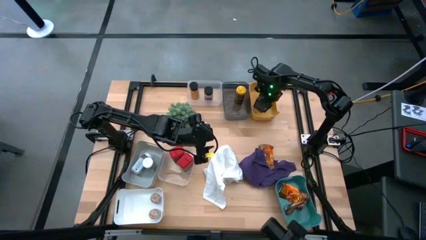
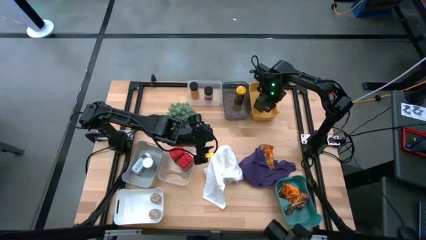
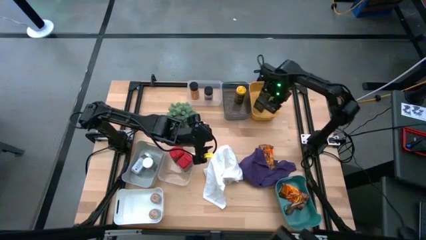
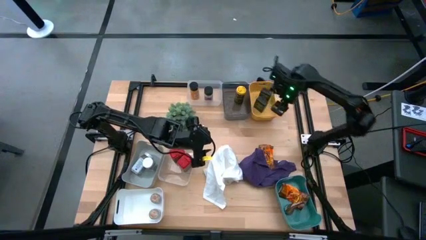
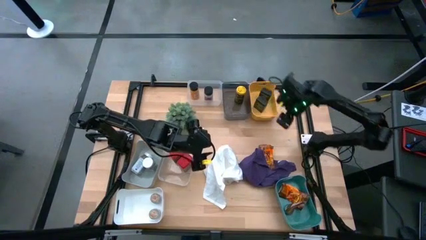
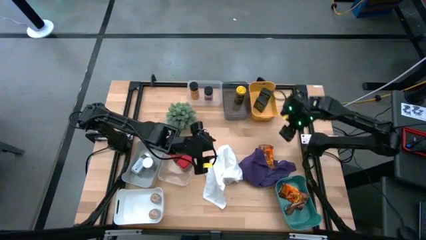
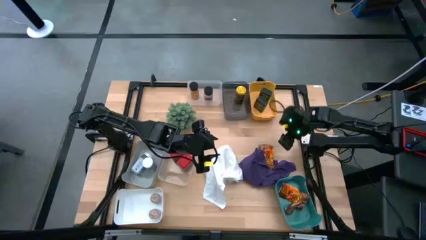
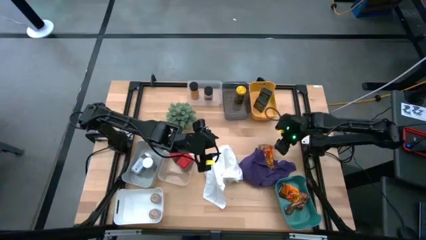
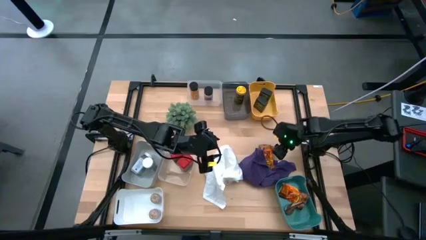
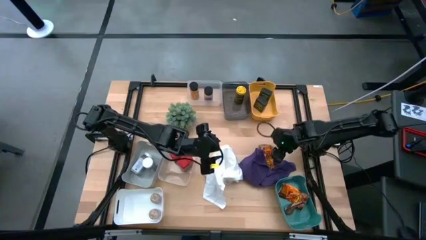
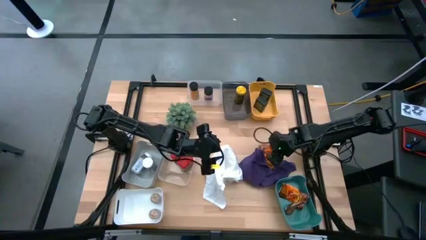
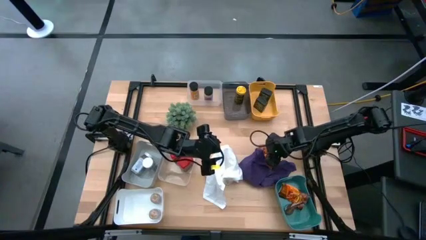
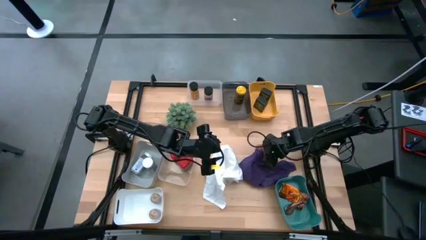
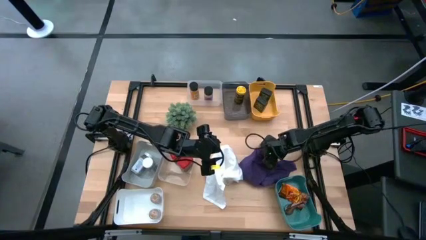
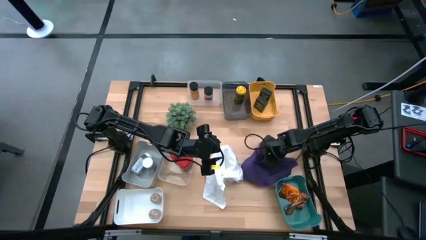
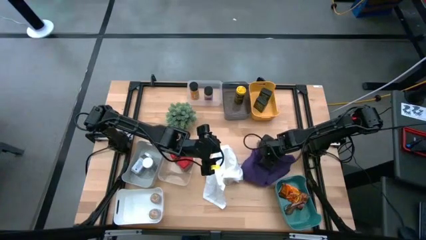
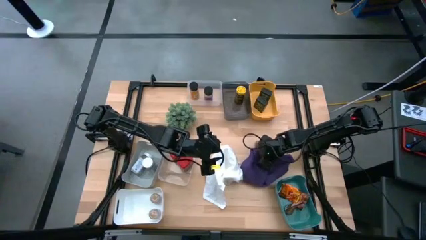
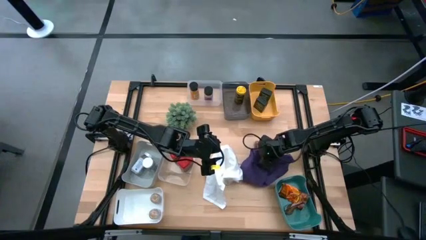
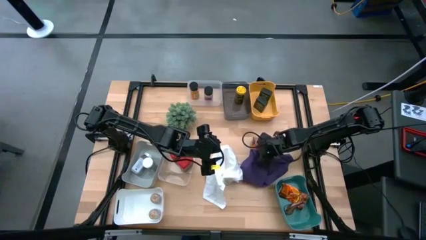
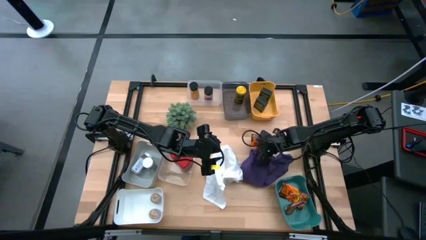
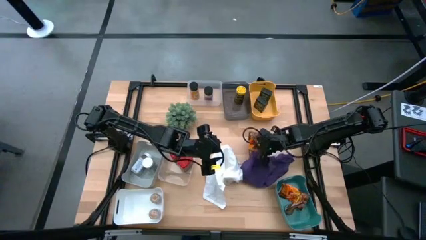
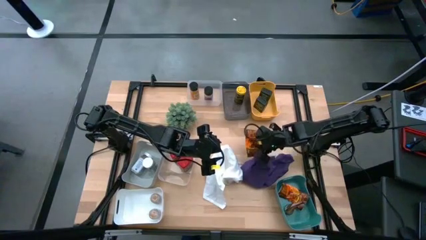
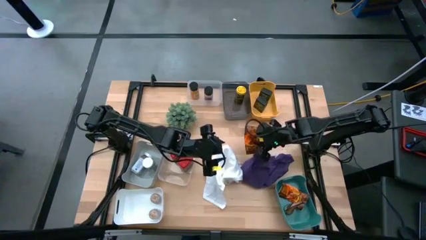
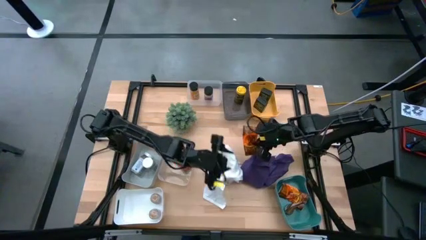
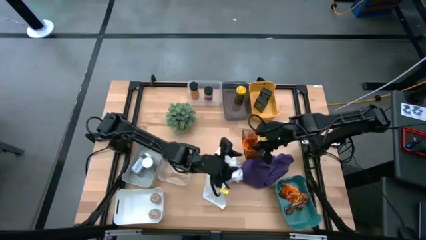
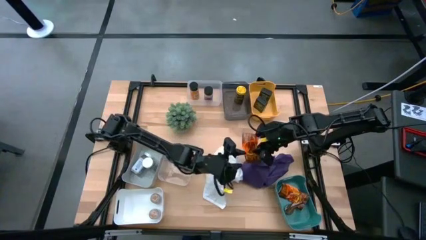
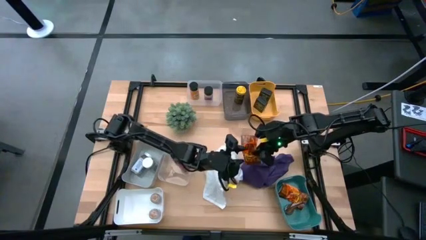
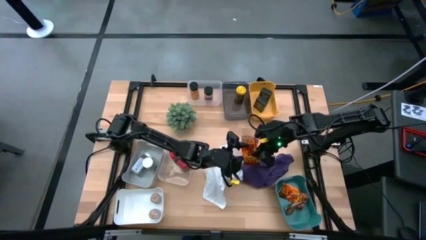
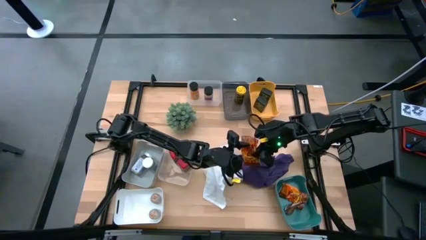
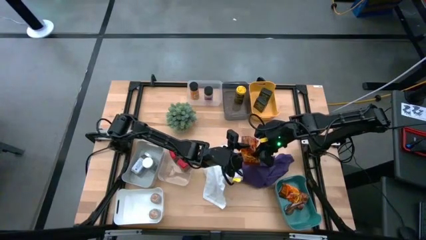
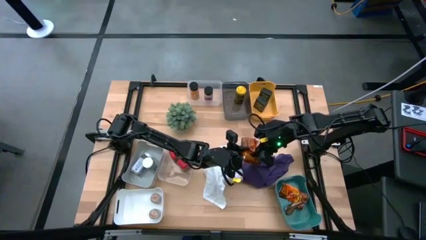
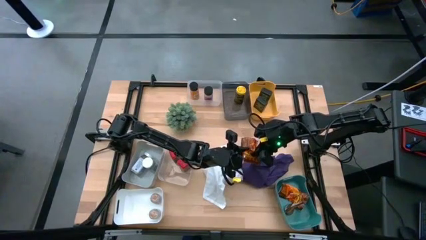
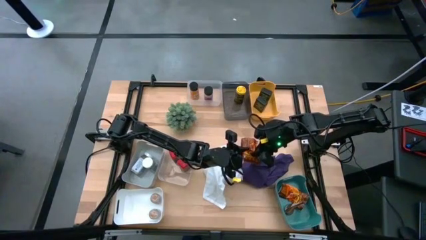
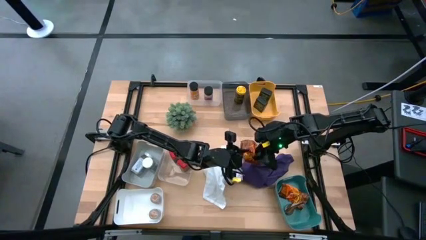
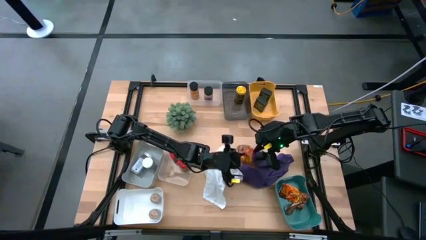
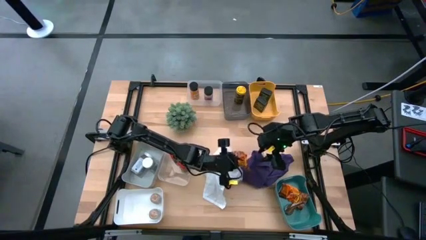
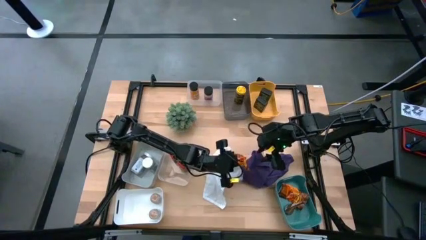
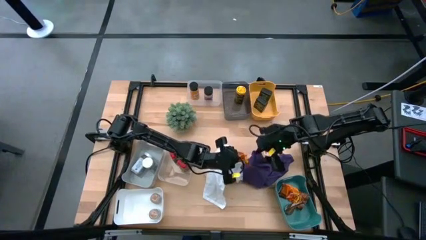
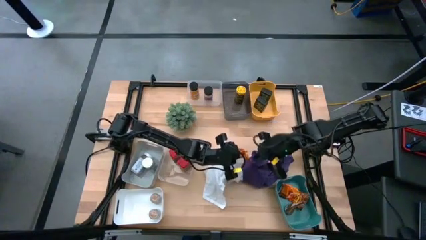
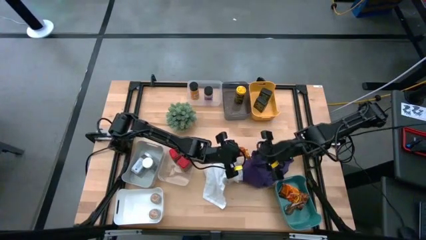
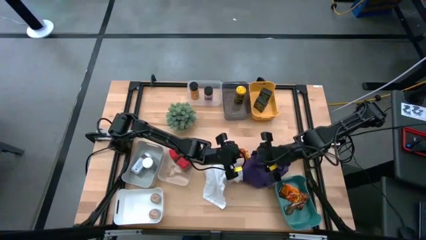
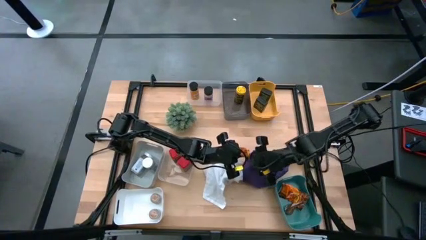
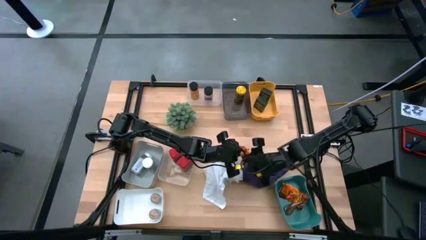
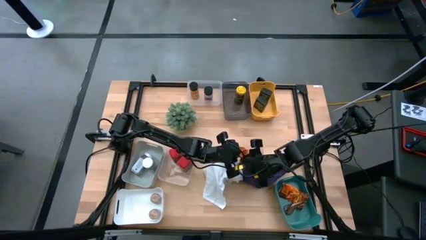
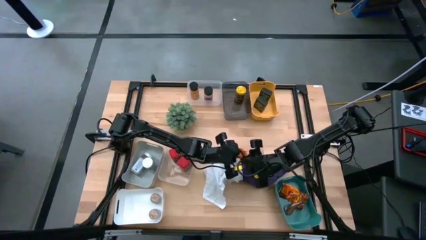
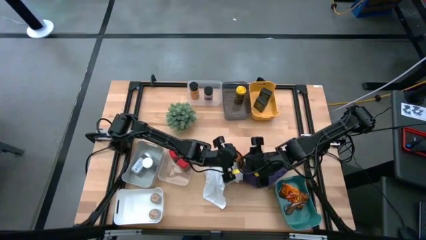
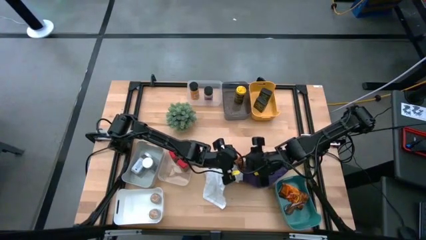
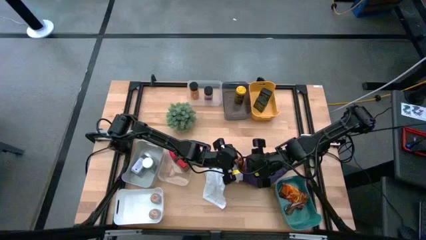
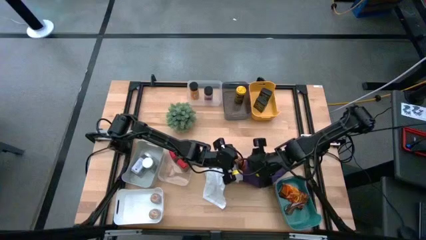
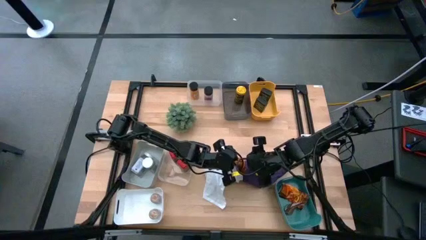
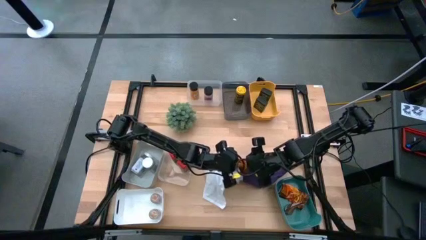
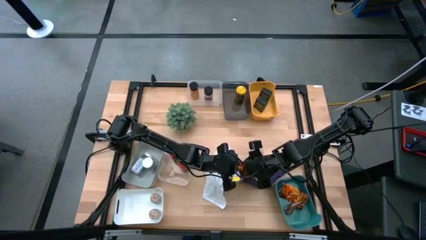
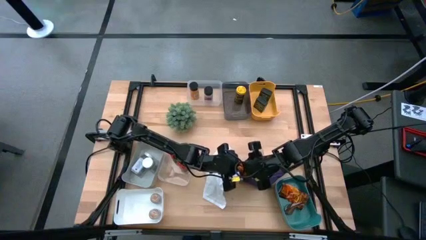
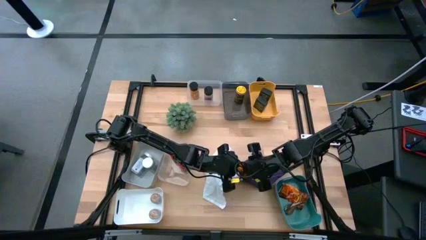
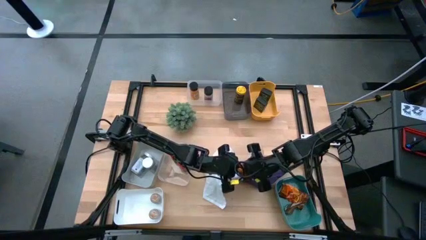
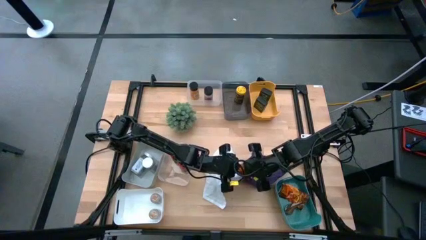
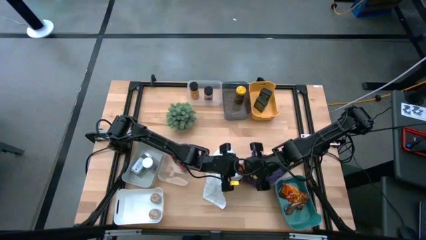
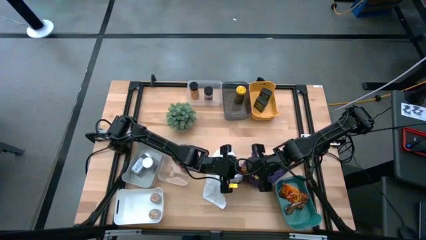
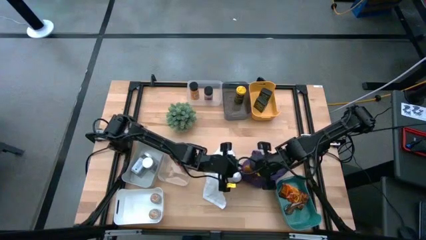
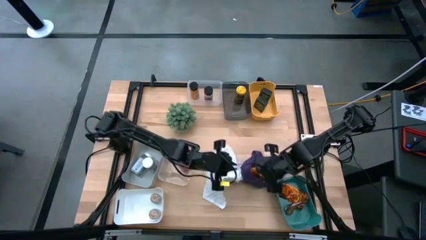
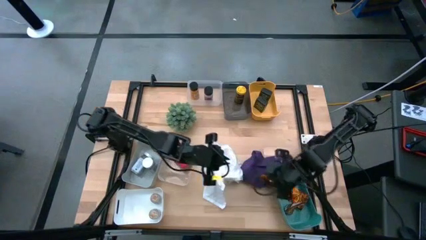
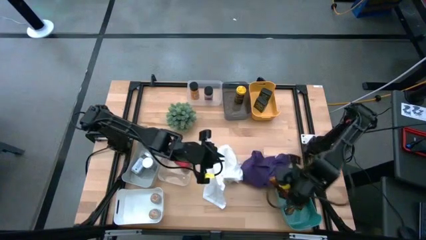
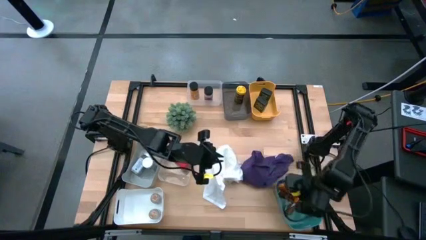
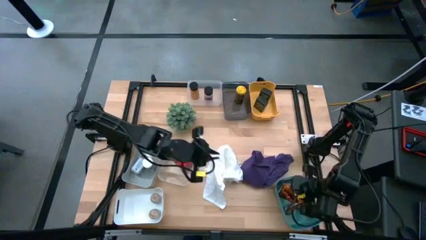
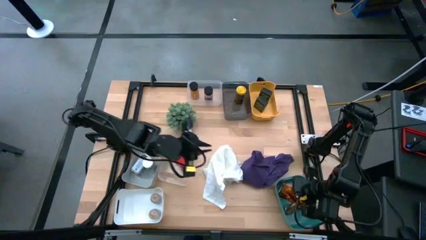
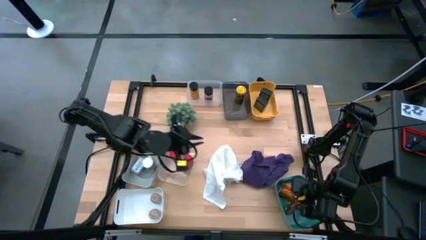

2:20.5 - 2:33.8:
Task: Sort spices by type
Put the orange seasoning bag into the green bin
